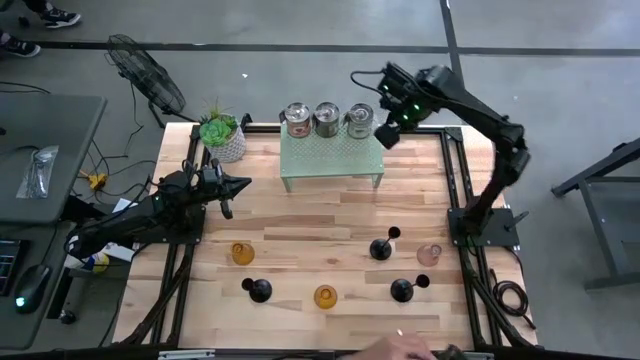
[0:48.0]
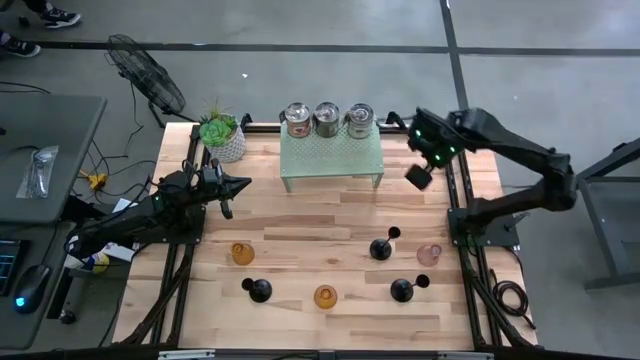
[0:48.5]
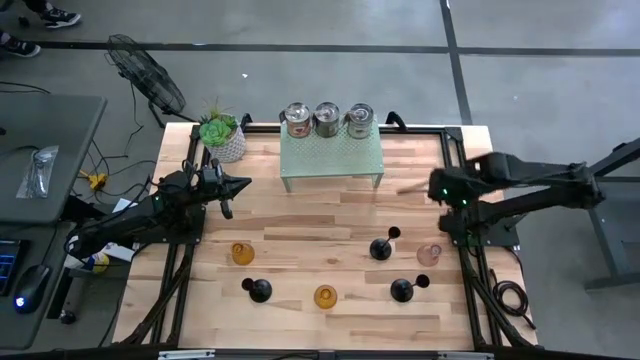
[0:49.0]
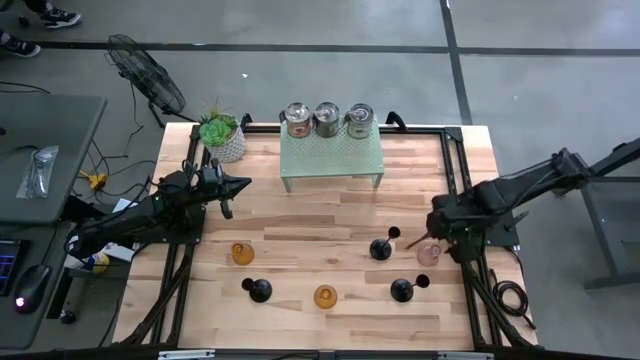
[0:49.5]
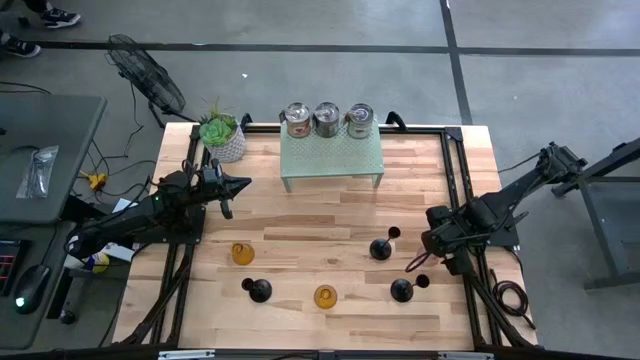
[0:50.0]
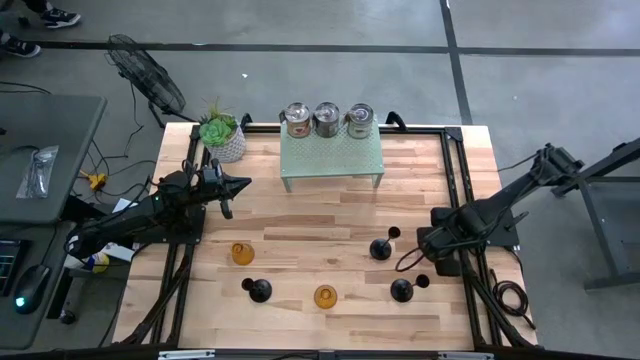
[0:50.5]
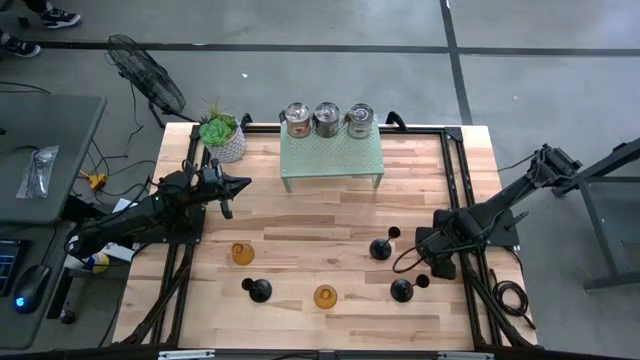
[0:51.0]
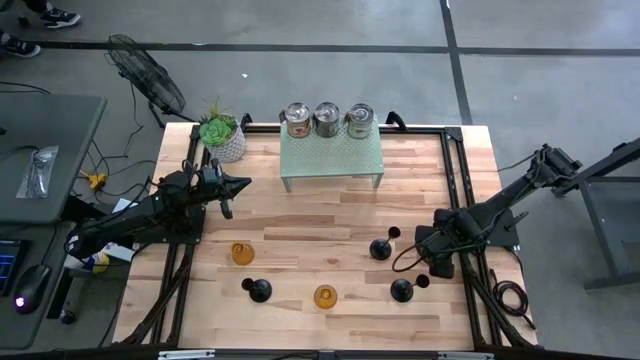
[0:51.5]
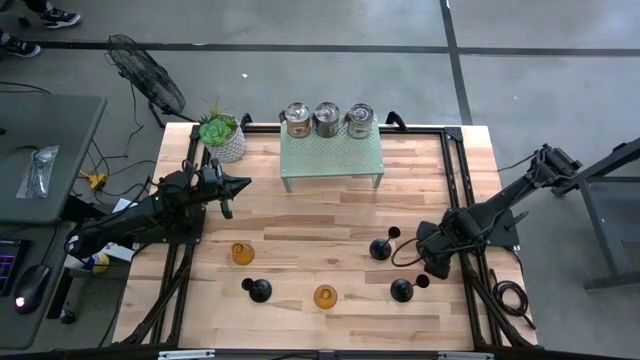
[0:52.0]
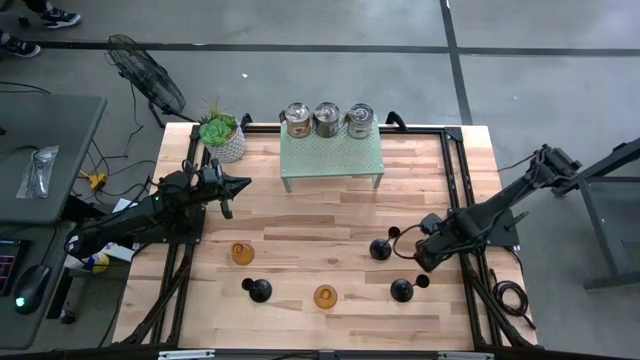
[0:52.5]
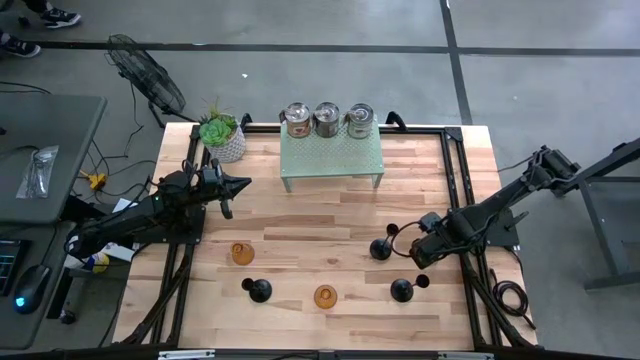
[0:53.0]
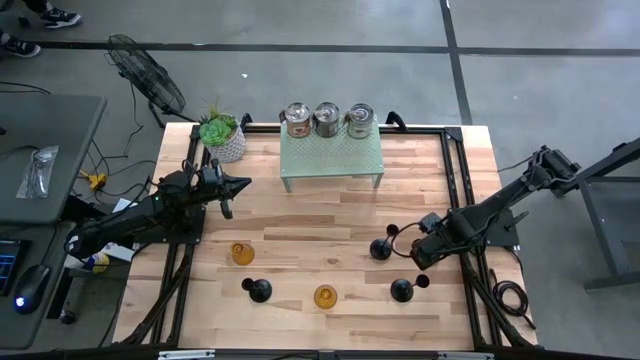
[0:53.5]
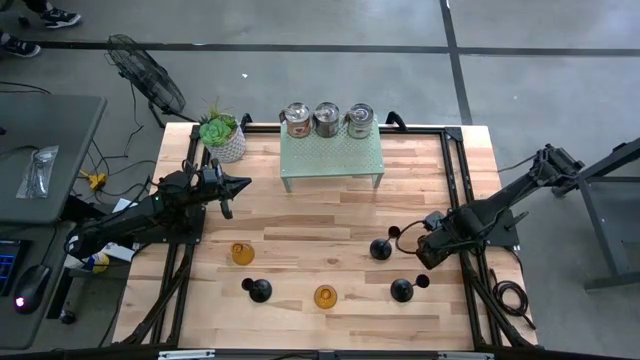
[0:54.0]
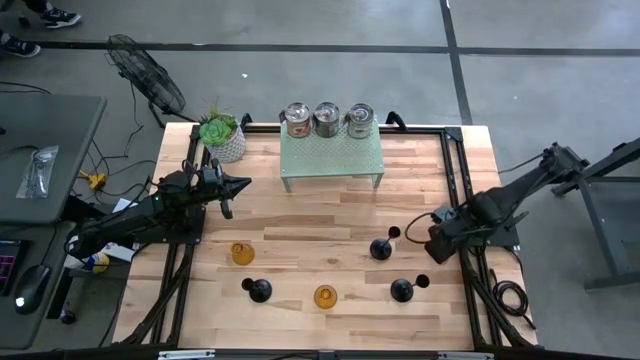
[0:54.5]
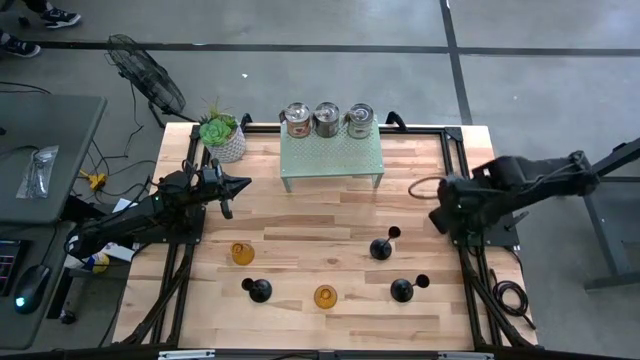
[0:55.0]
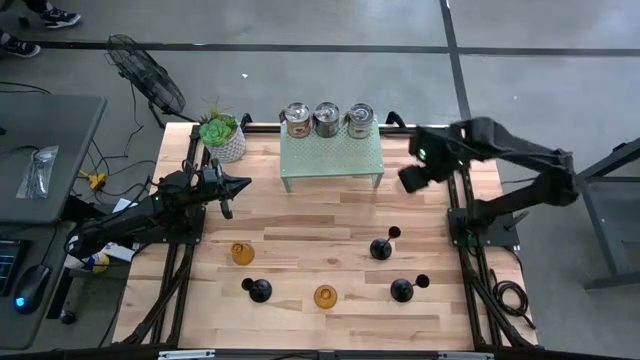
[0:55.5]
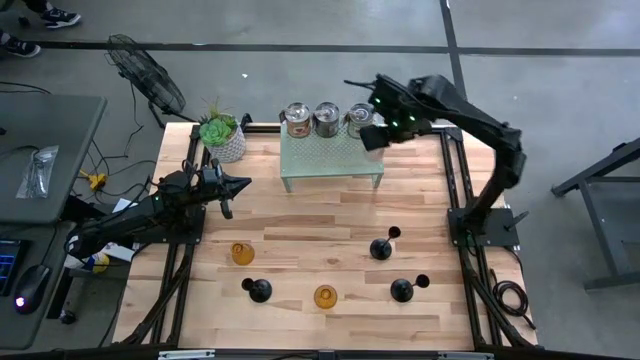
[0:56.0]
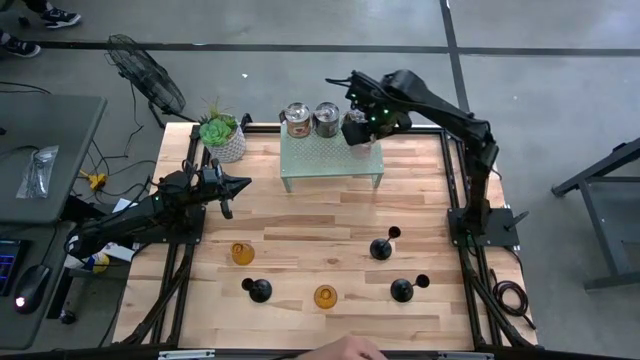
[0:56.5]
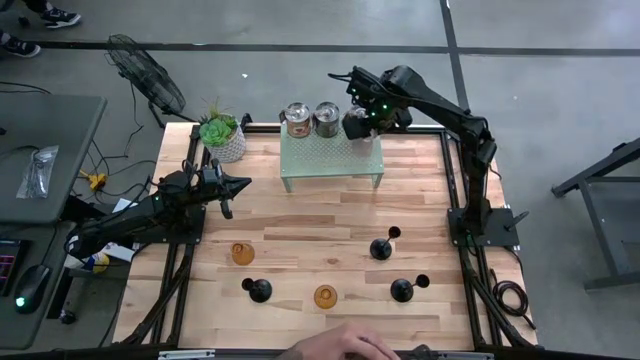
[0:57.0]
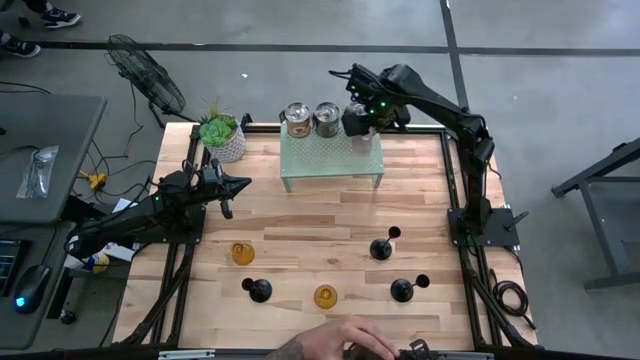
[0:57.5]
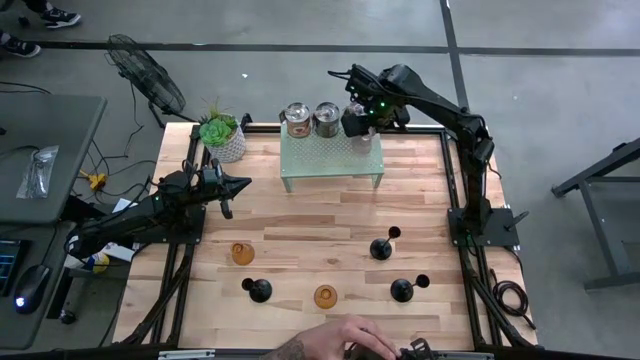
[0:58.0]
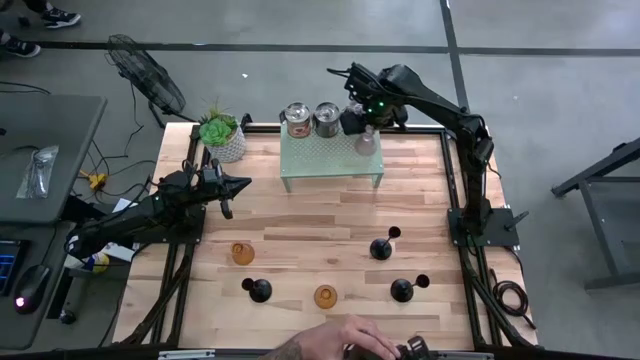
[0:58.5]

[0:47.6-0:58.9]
Task: Pick & Place candle stick holders
Put the pink glass candle holder on the shelf

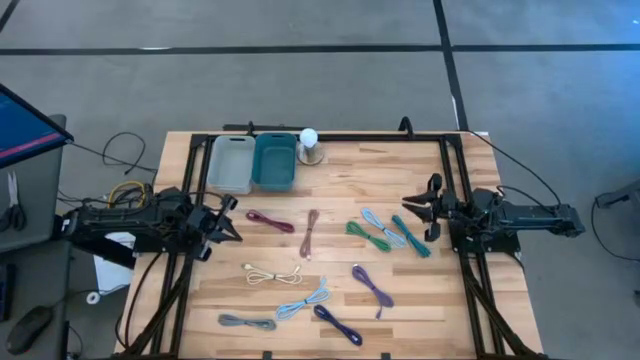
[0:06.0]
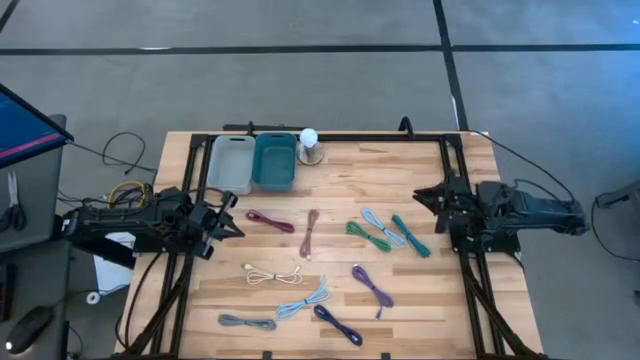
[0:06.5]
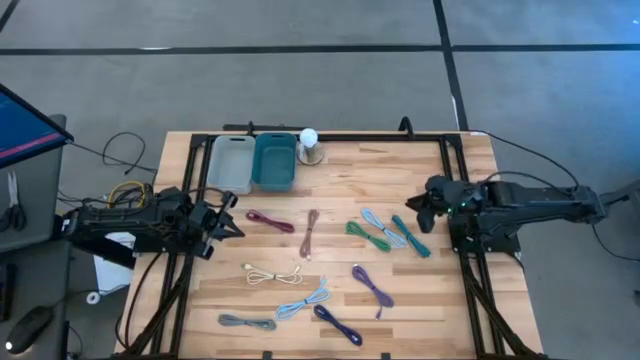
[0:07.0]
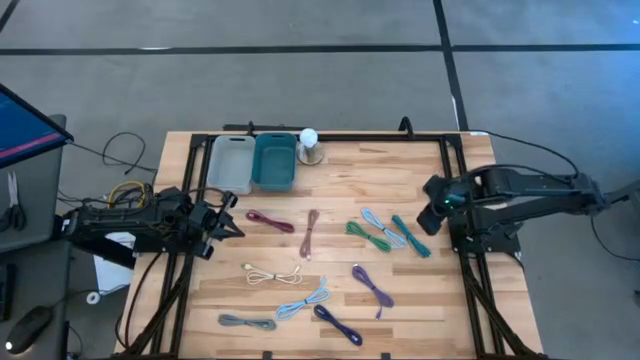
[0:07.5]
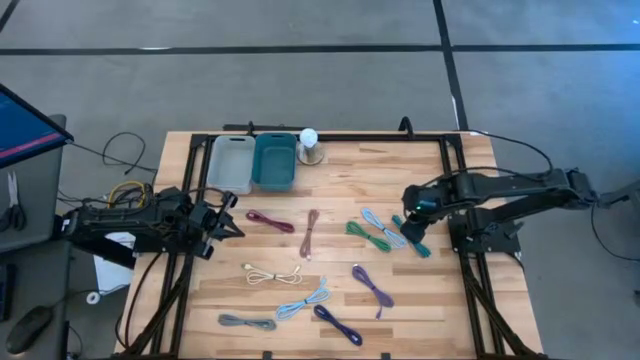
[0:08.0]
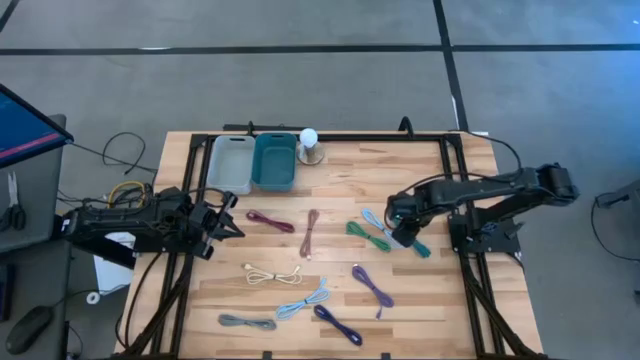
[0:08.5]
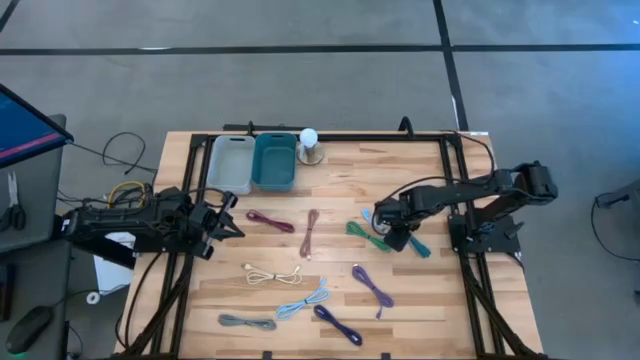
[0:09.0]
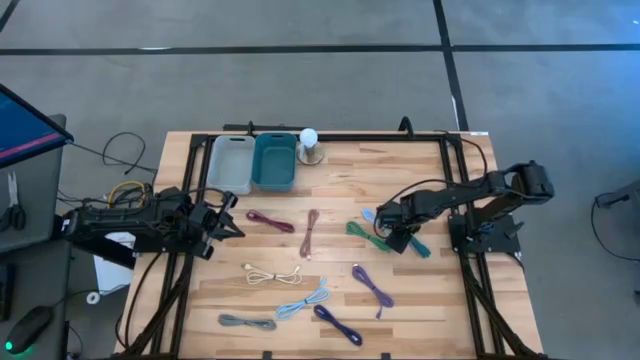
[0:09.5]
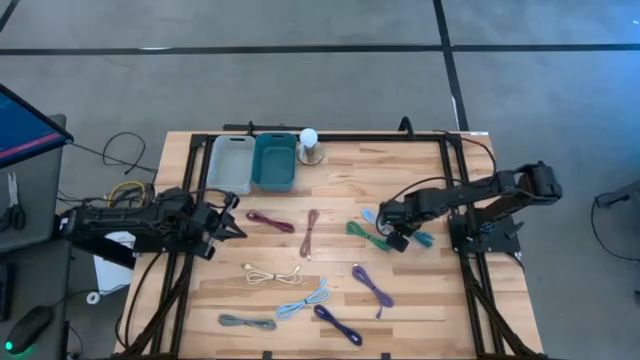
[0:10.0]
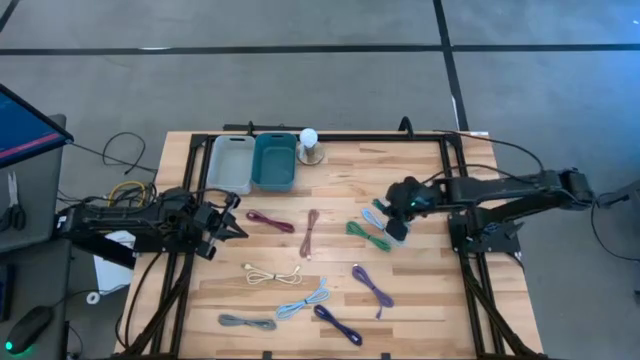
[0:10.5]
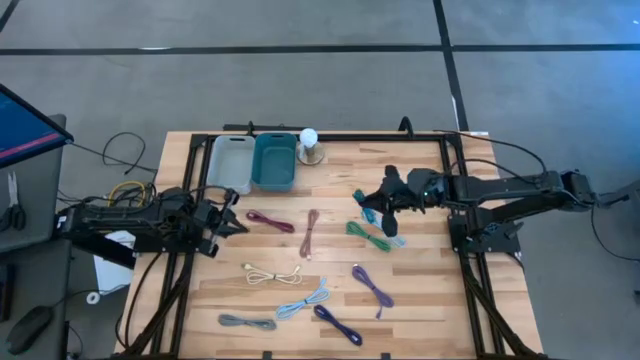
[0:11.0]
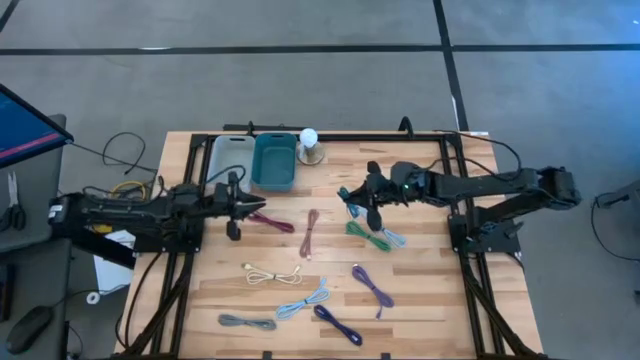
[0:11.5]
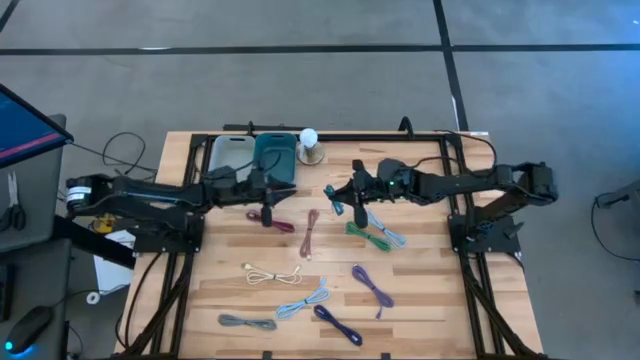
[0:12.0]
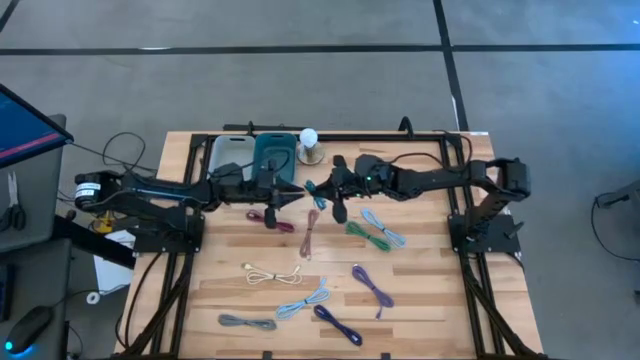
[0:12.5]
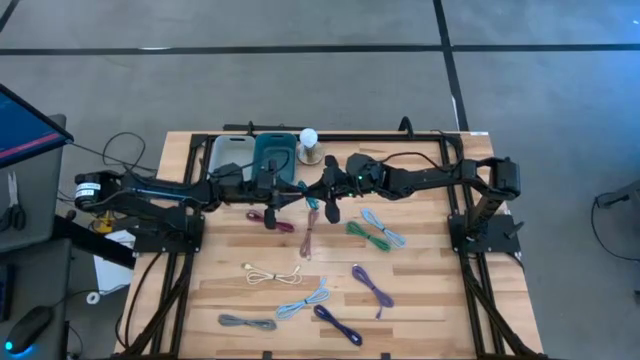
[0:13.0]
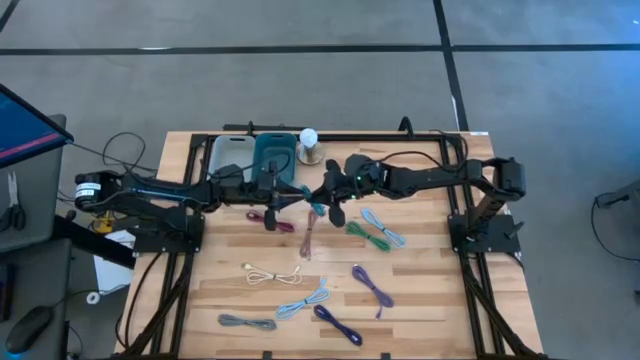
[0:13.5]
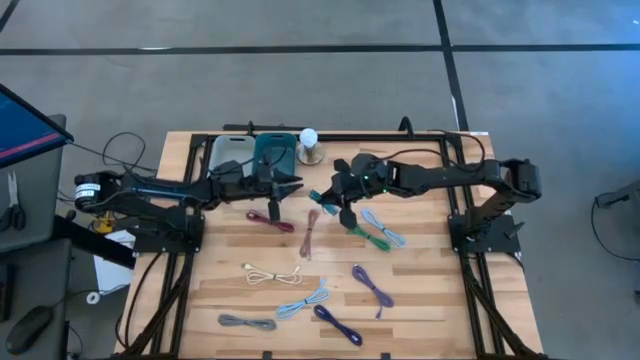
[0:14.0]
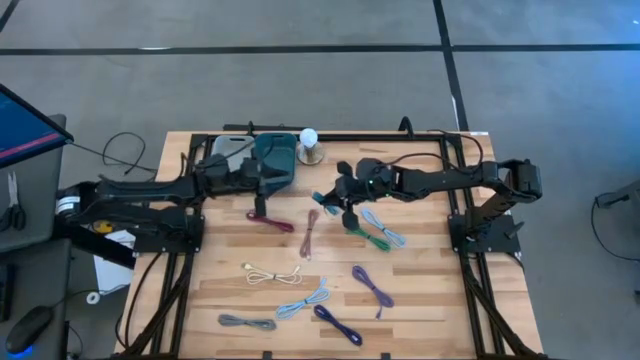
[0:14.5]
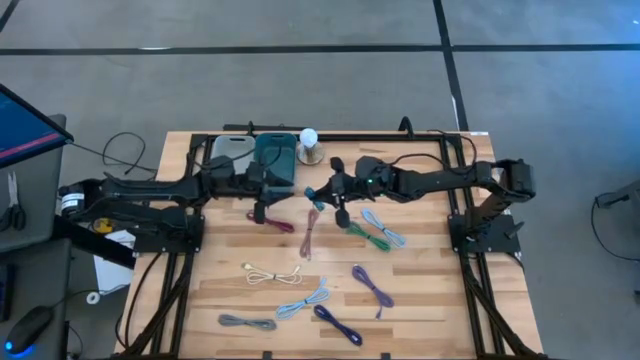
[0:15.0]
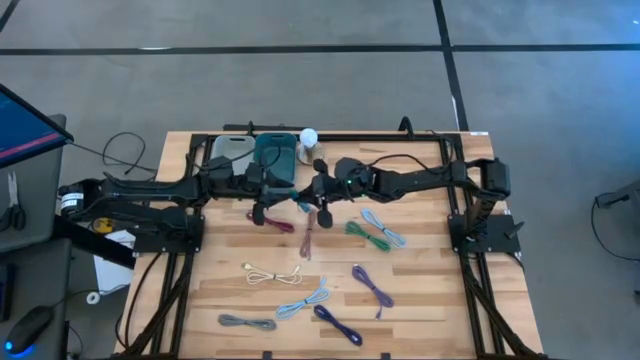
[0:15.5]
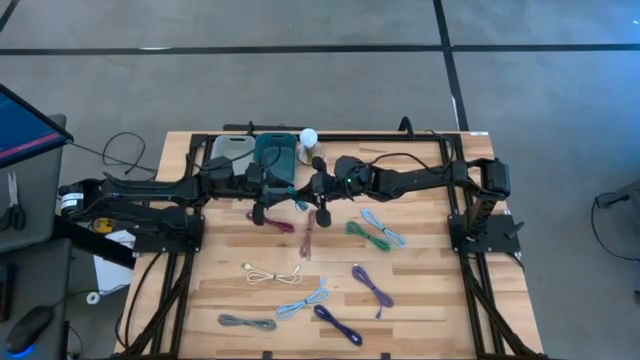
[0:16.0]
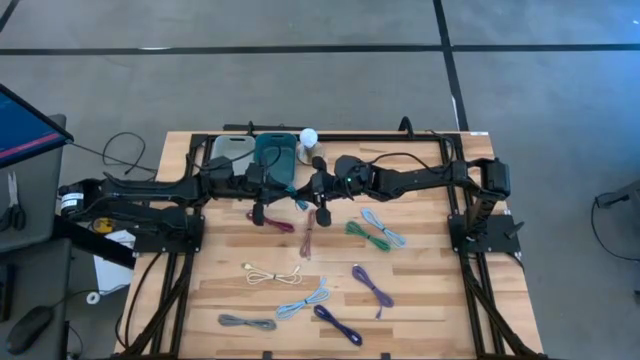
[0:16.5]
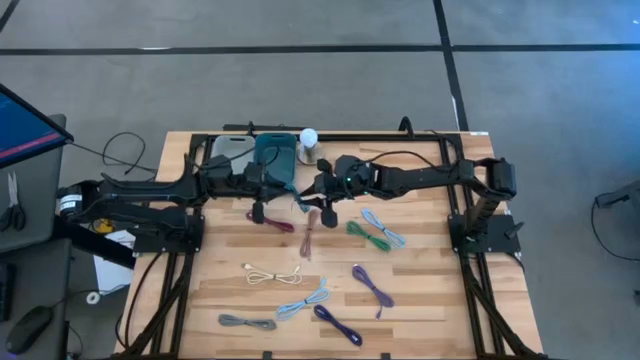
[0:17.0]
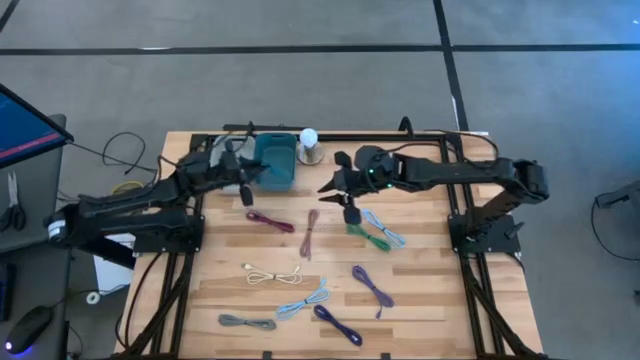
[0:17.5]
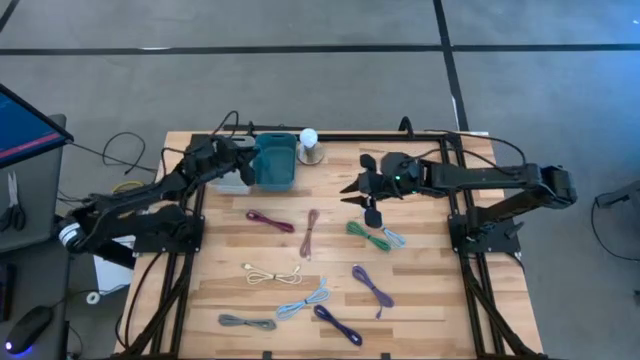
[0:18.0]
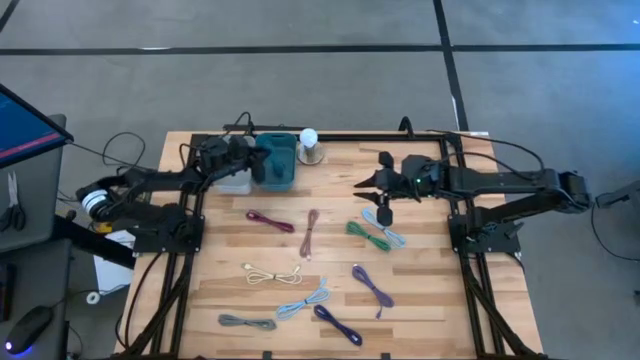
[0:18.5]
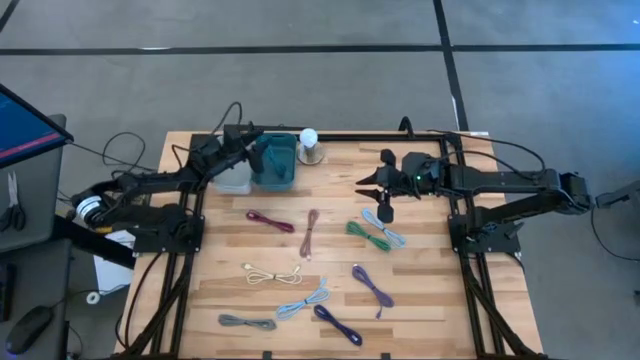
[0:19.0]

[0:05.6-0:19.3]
Task: Pick & Place USB Port
Put the blue patterned charger cable into the blue bin
